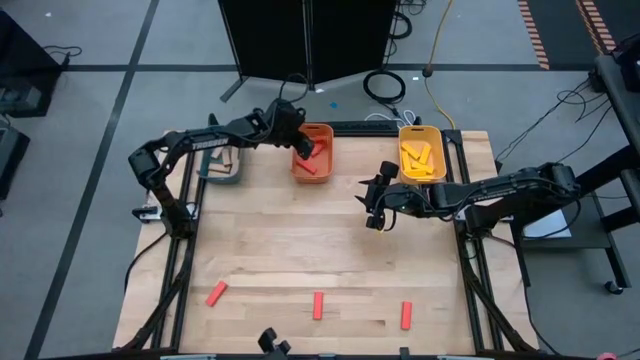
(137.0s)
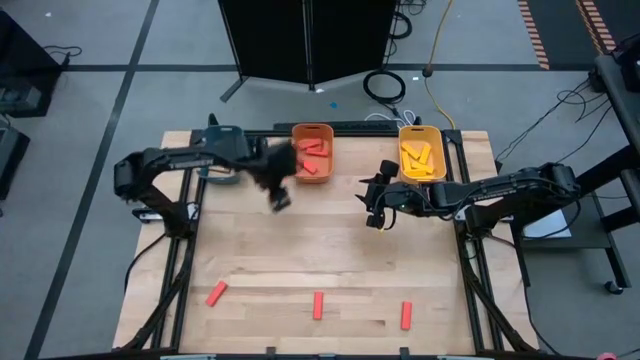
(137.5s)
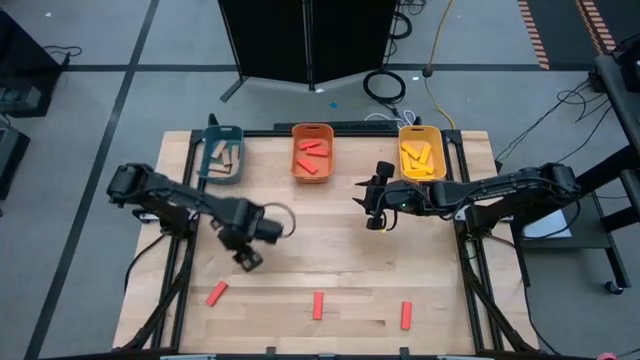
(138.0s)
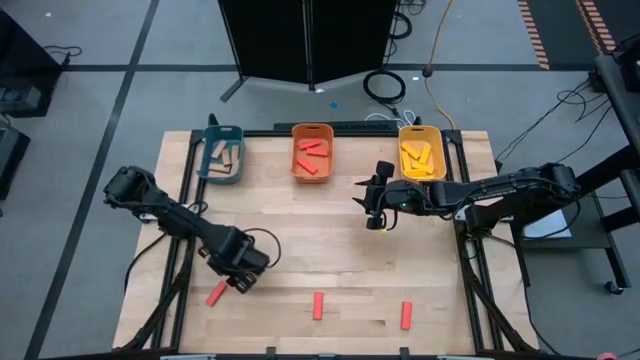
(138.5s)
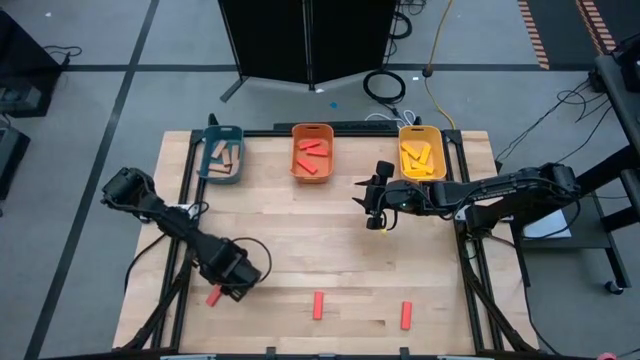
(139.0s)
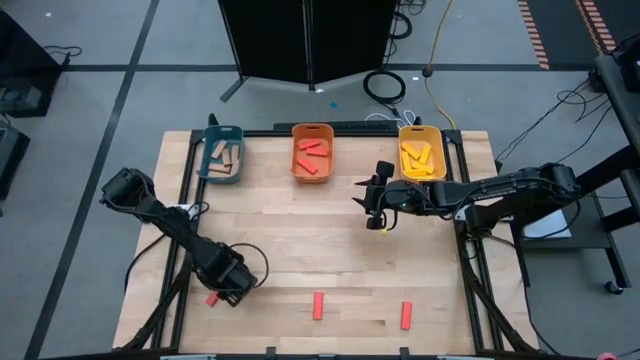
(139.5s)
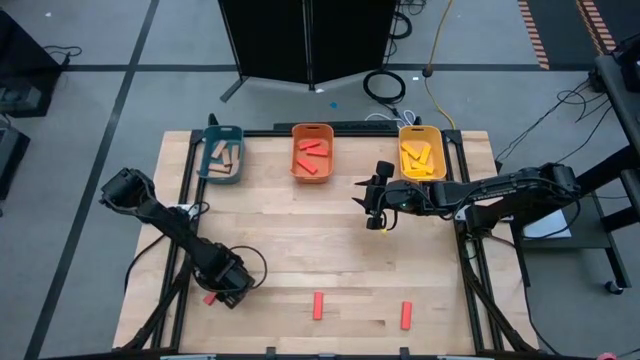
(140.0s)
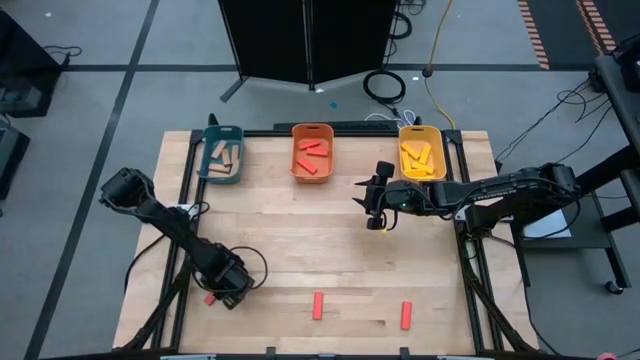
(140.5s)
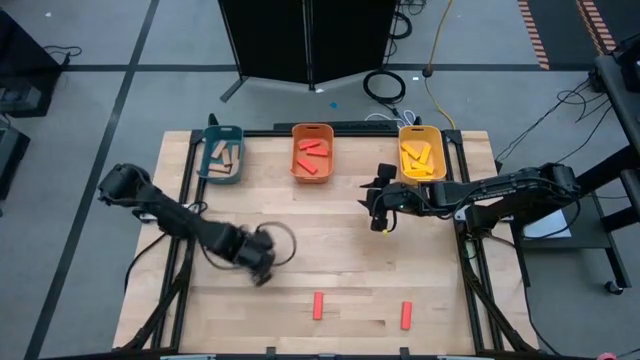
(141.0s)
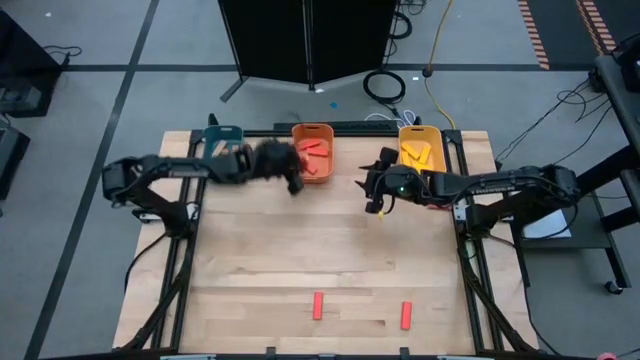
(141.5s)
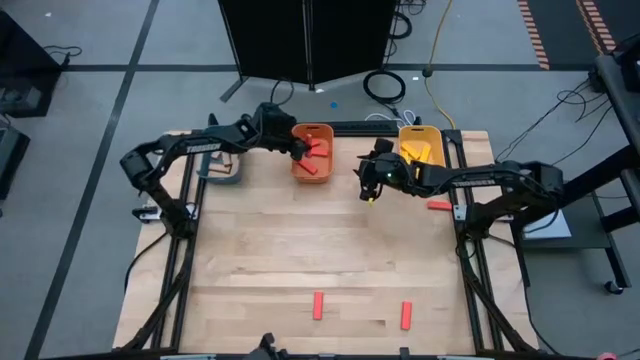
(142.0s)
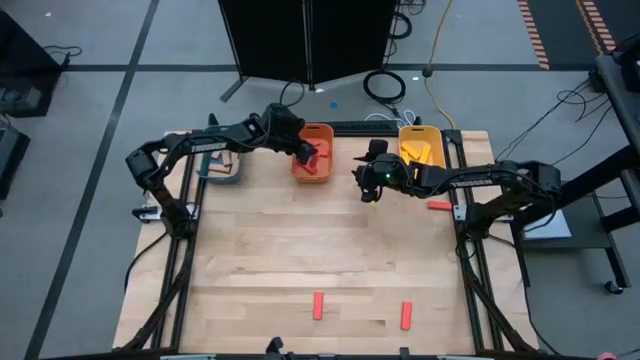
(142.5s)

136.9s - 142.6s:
Task: Sort blocks
Put the red block into the orange bin

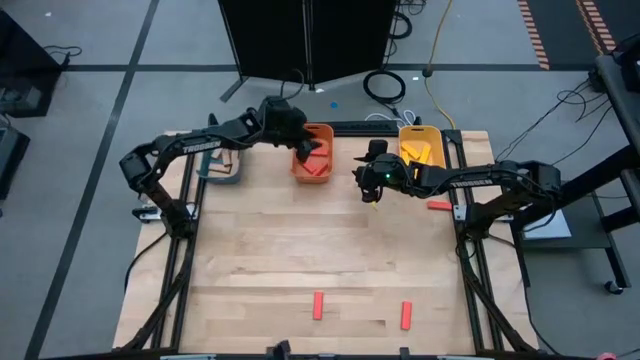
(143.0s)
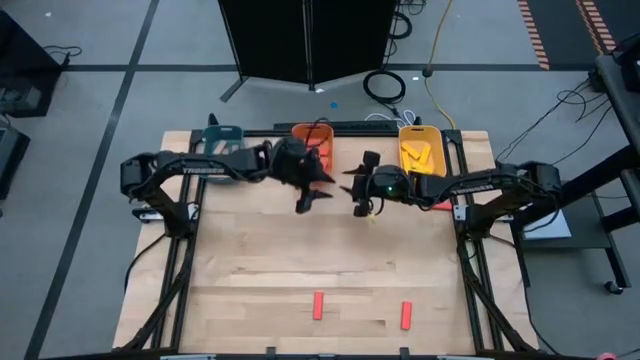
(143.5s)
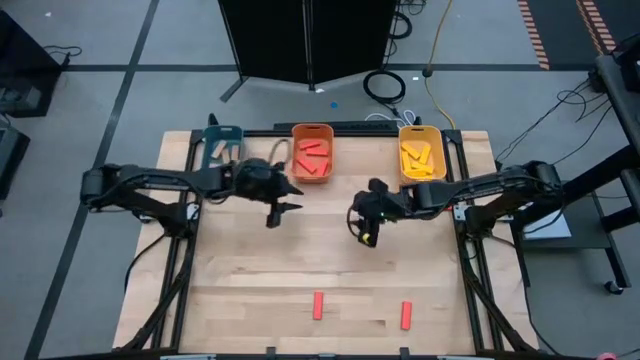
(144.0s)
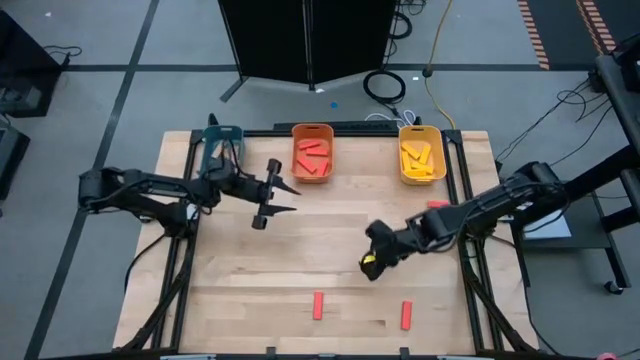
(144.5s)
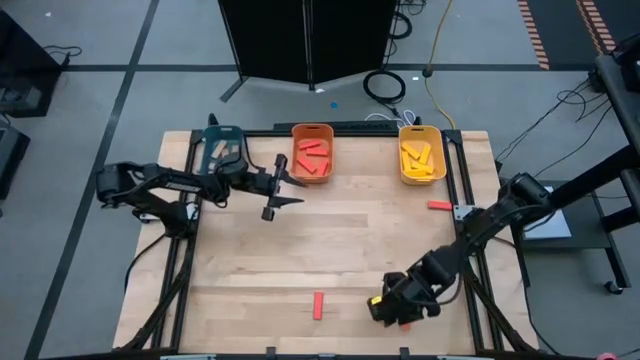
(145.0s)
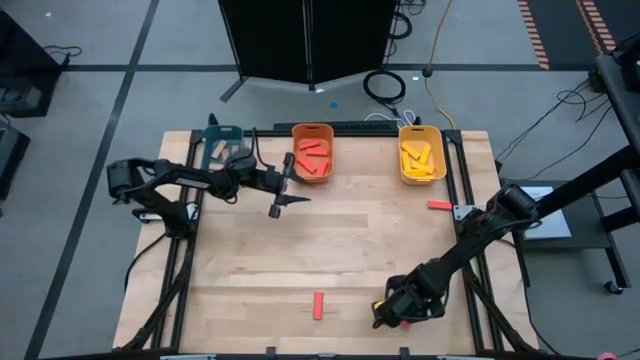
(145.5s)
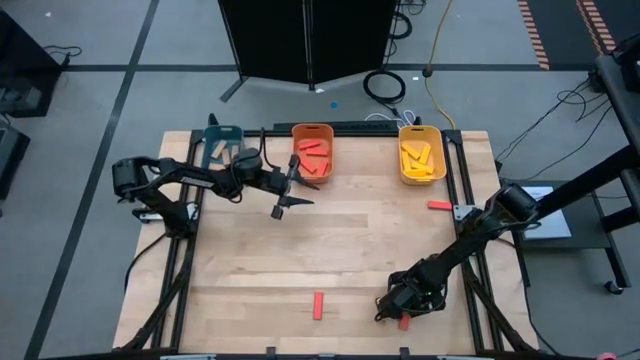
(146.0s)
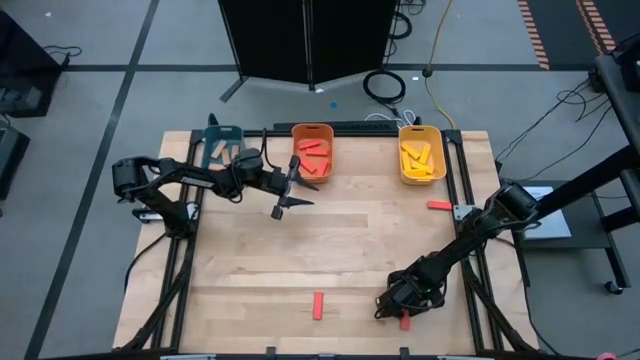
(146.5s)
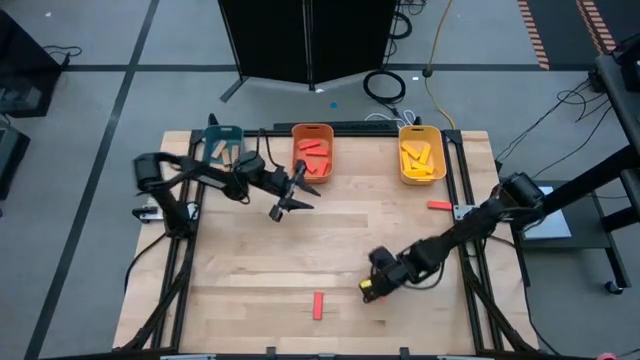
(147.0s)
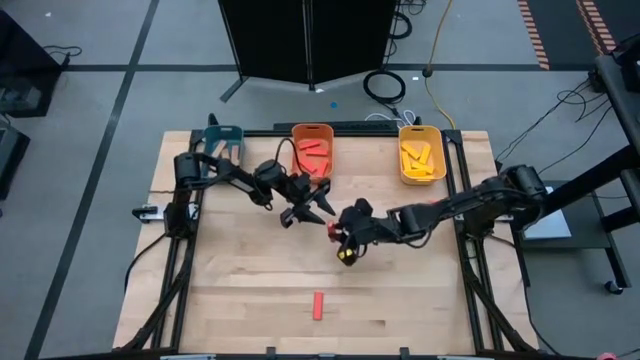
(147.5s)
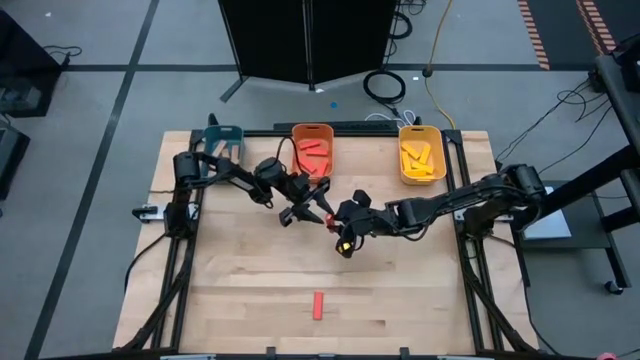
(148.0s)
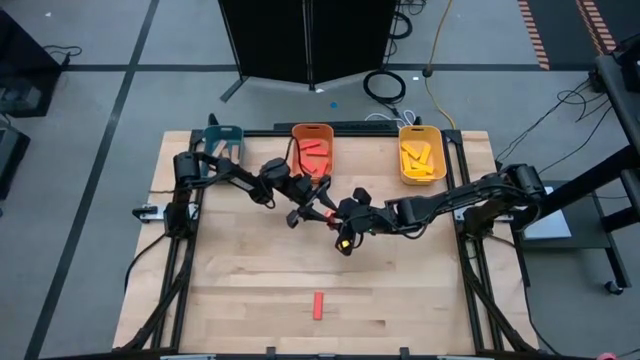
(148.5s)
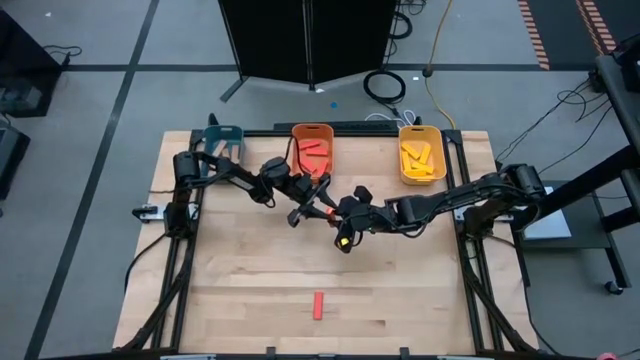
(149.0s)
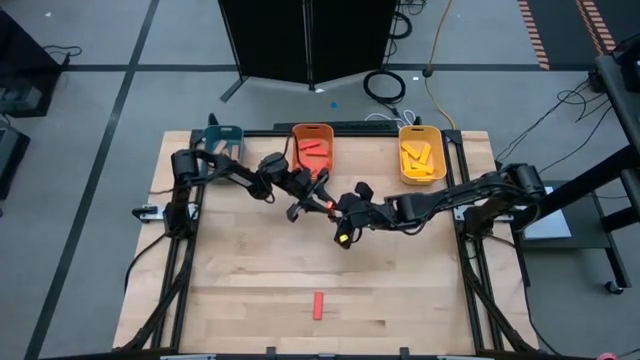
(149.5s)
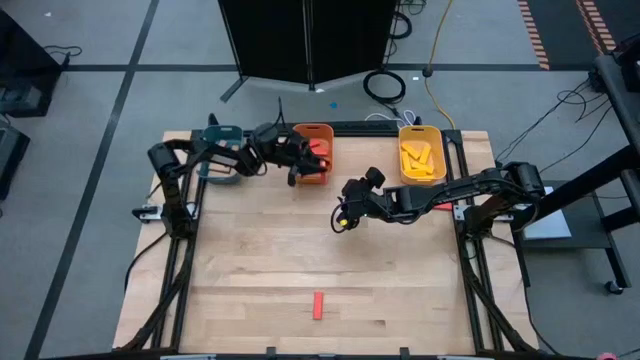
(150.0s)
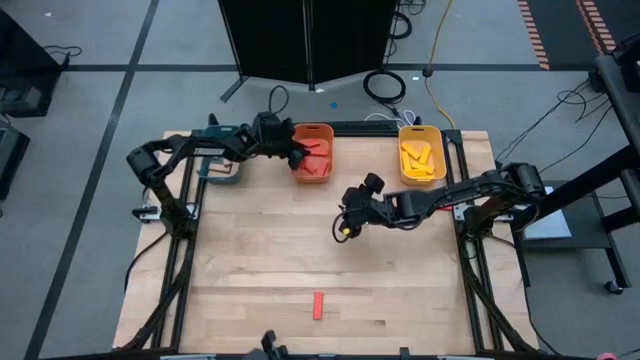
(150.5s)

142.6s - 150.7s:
Put the red block into the orange bin

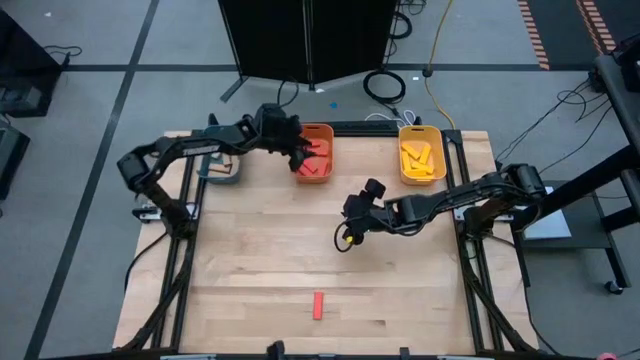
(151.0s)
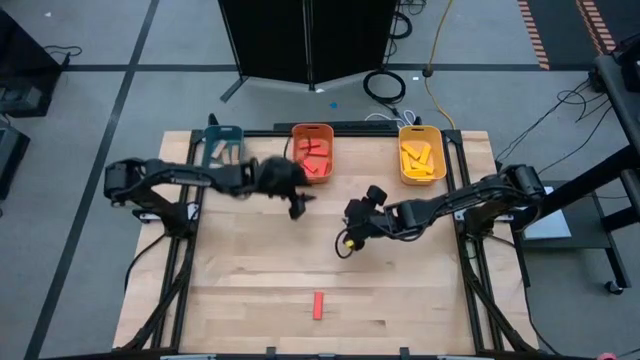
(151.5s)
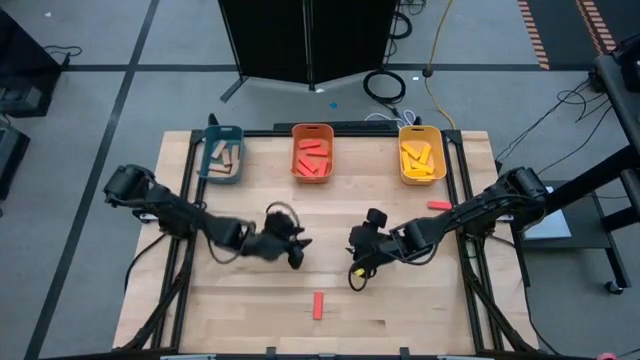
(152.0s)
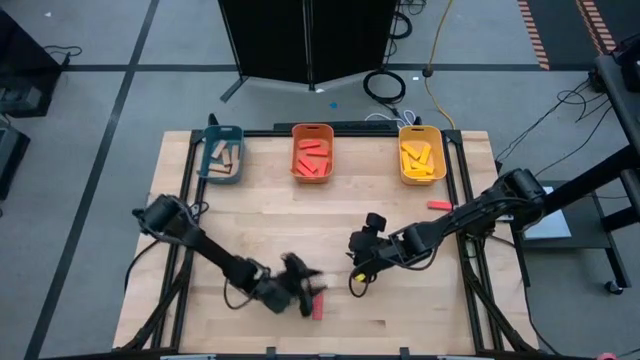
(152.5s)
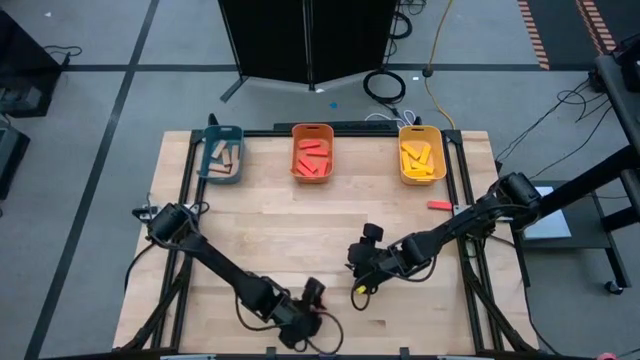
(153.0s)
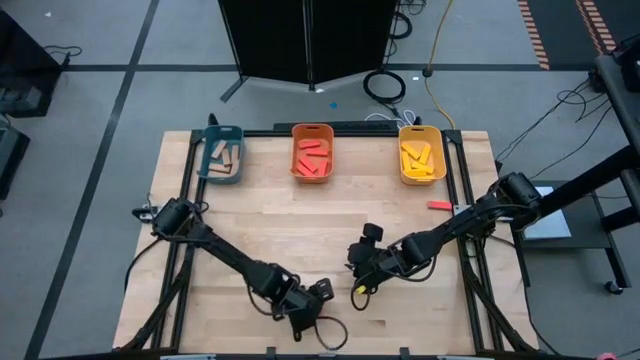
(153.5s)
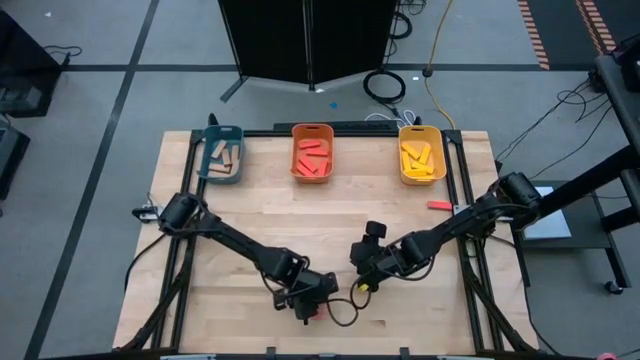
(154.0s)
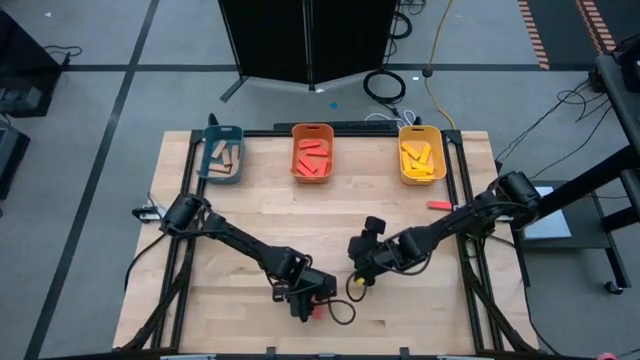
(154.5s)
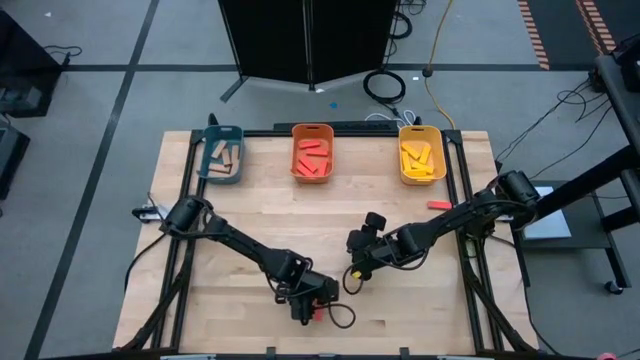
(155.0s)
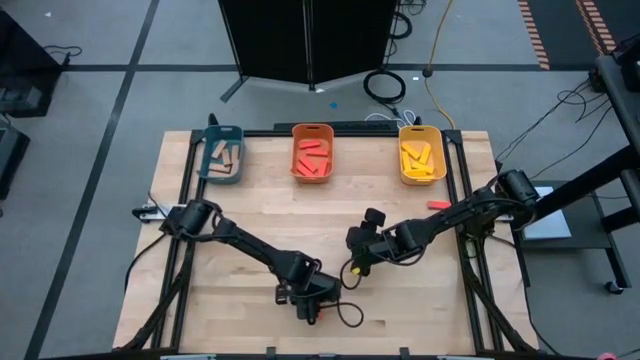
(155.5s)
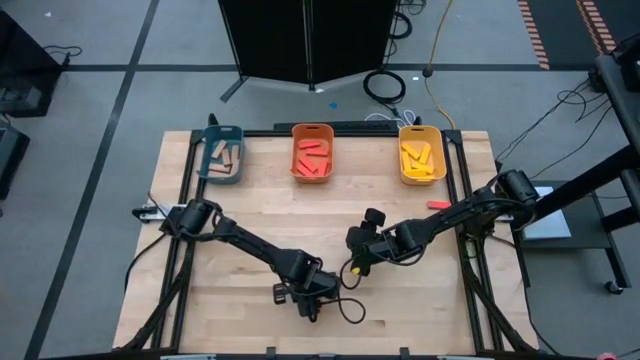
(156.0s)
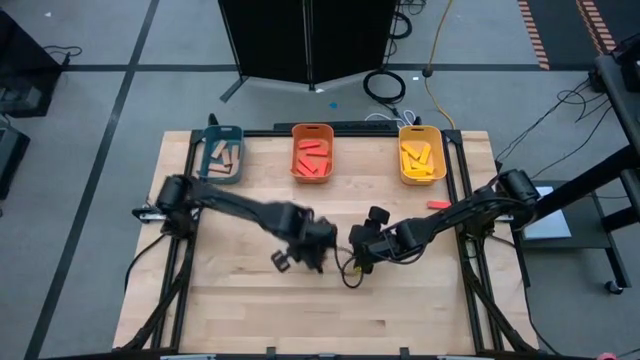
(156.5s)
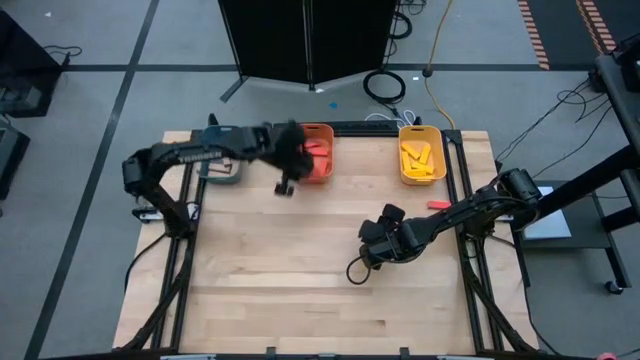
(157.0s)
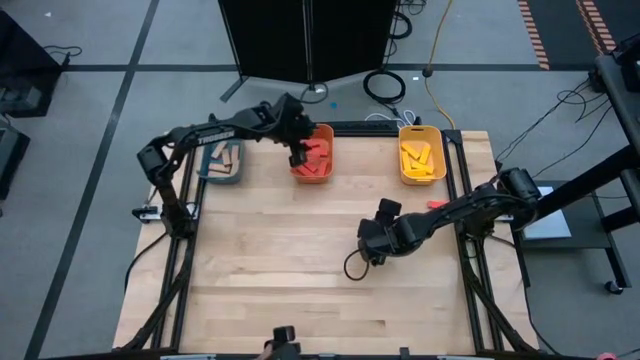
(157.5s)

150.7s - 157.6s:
Put the red block into the orange bin
